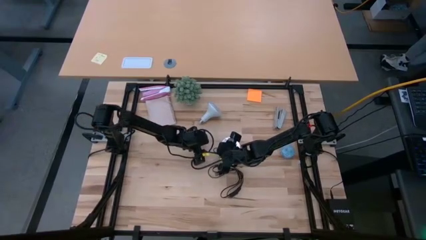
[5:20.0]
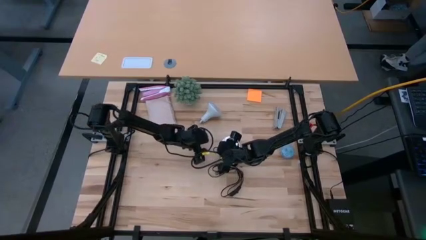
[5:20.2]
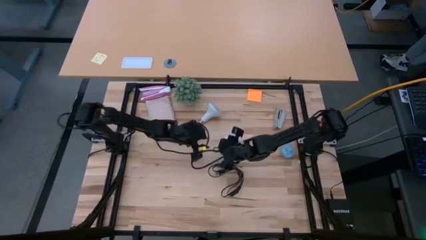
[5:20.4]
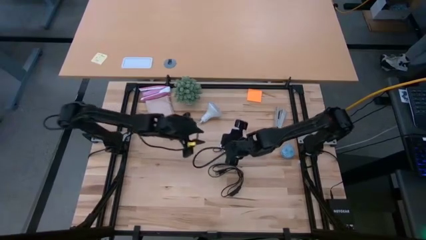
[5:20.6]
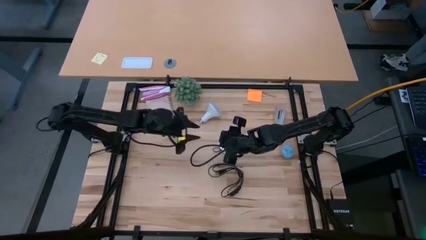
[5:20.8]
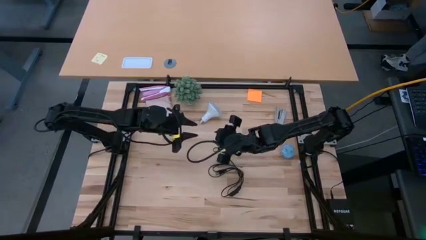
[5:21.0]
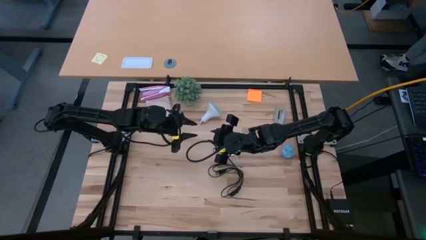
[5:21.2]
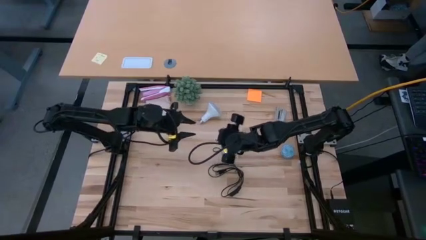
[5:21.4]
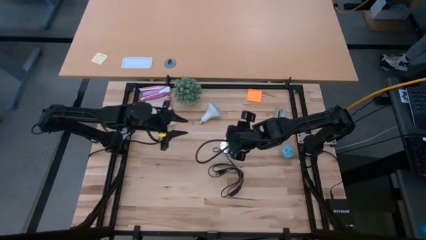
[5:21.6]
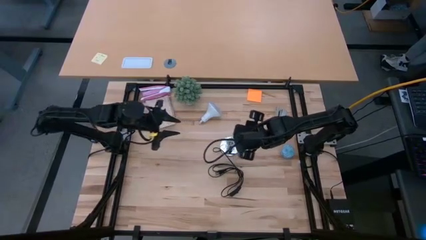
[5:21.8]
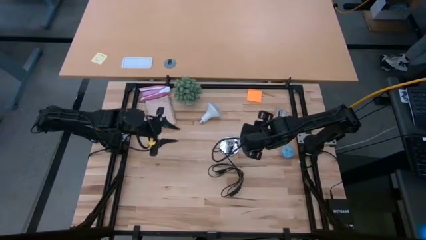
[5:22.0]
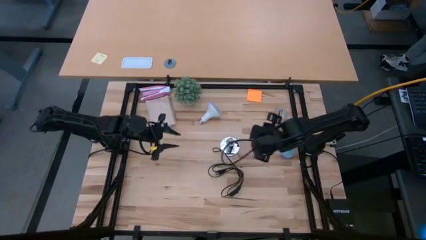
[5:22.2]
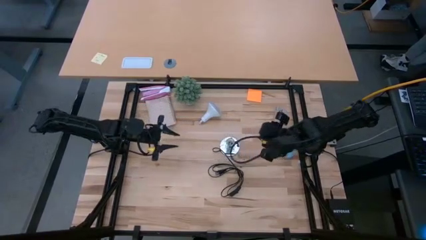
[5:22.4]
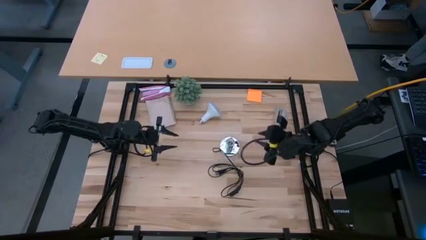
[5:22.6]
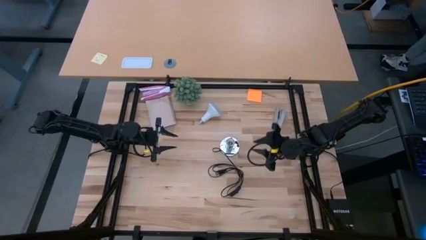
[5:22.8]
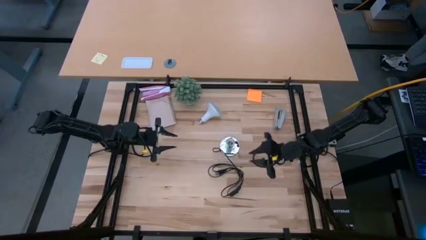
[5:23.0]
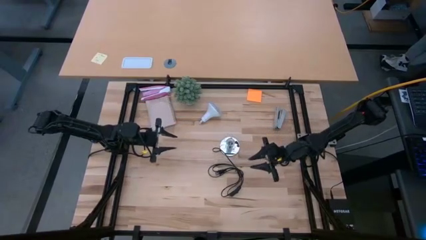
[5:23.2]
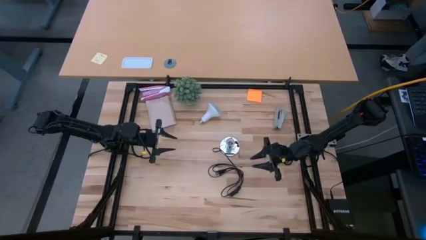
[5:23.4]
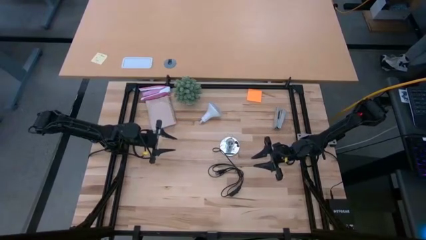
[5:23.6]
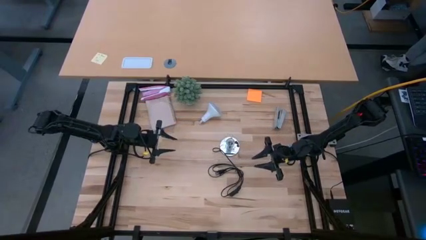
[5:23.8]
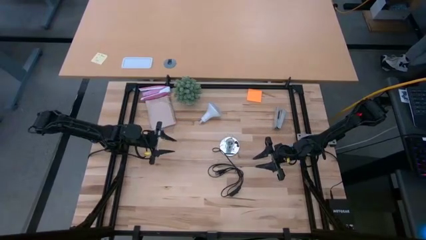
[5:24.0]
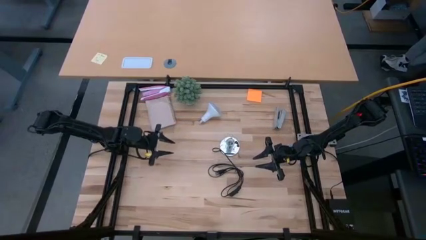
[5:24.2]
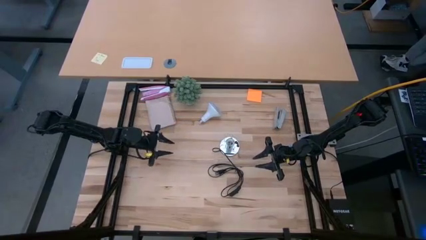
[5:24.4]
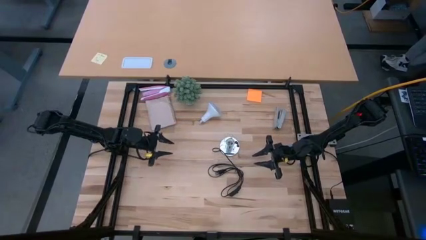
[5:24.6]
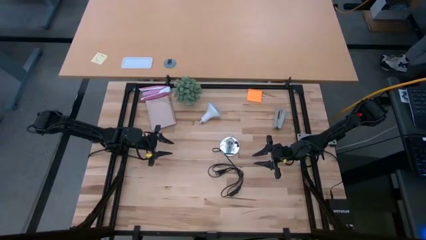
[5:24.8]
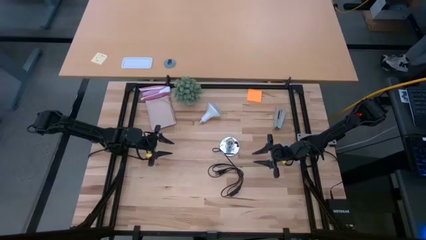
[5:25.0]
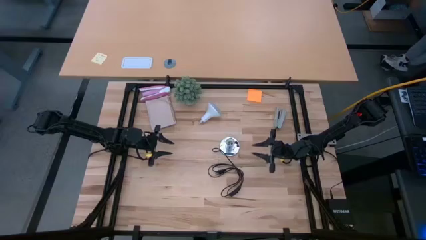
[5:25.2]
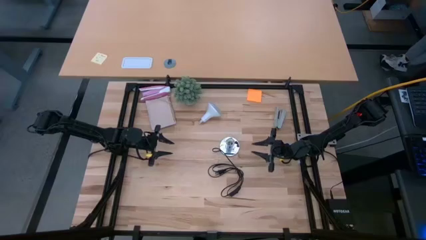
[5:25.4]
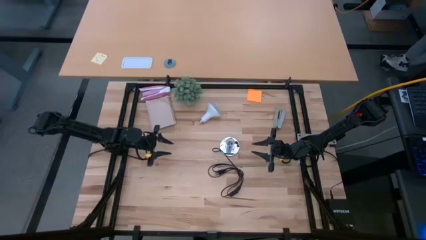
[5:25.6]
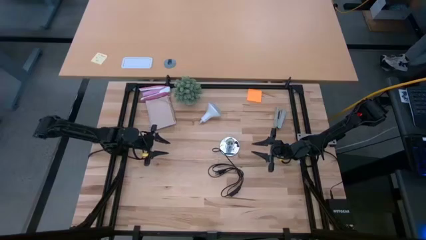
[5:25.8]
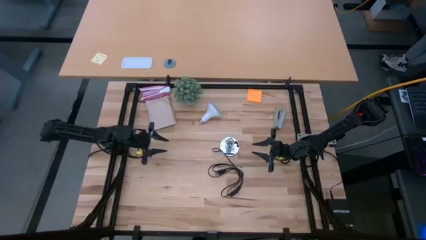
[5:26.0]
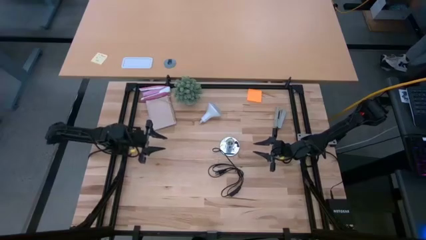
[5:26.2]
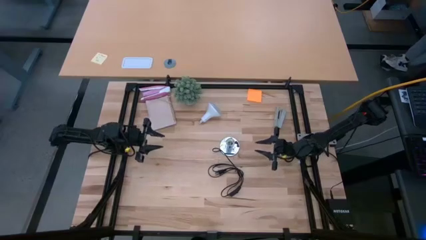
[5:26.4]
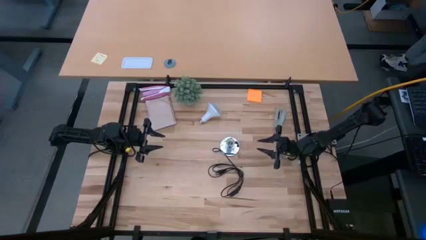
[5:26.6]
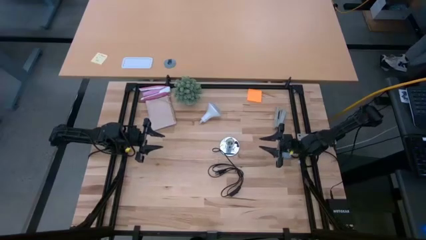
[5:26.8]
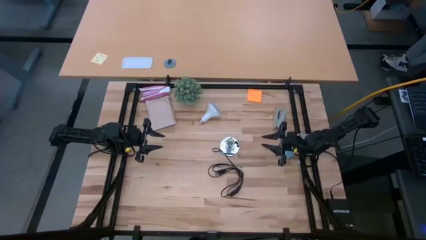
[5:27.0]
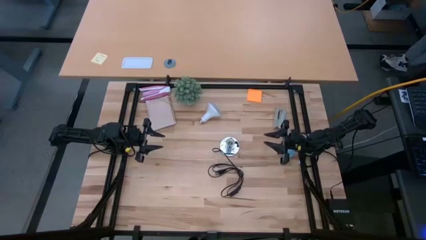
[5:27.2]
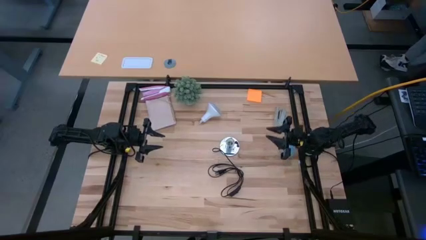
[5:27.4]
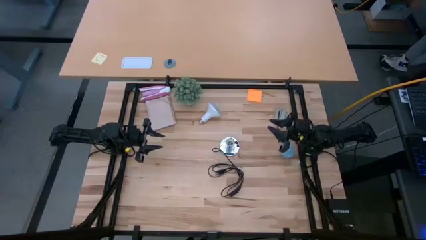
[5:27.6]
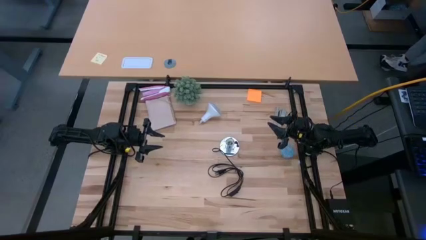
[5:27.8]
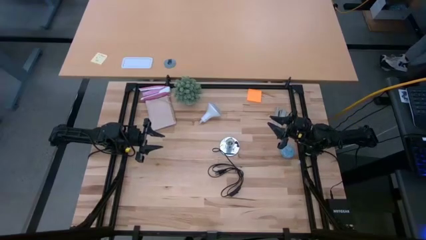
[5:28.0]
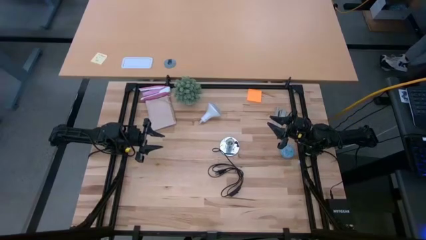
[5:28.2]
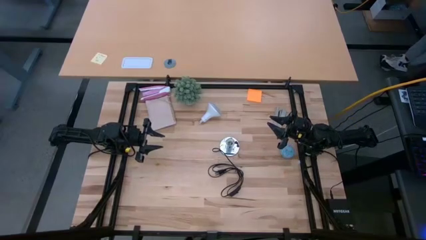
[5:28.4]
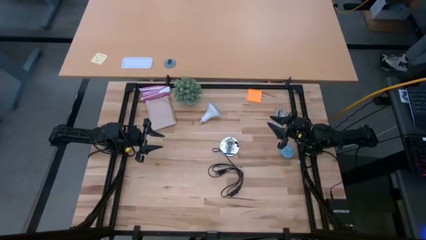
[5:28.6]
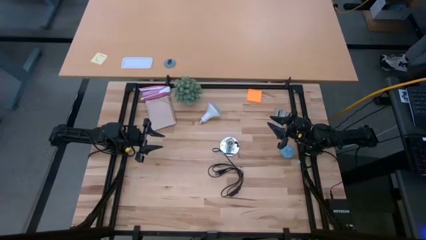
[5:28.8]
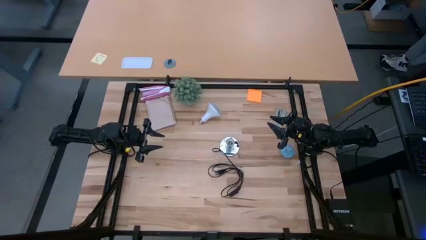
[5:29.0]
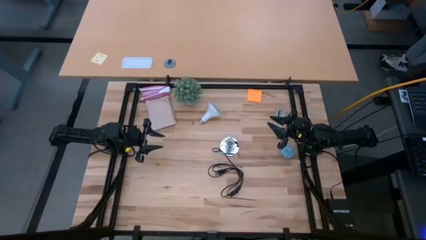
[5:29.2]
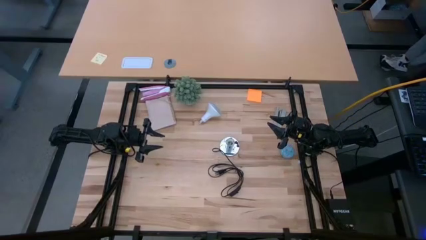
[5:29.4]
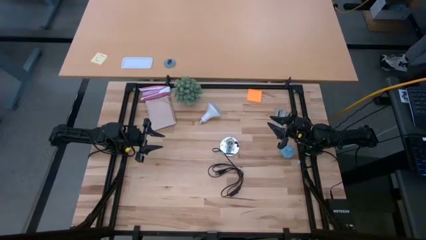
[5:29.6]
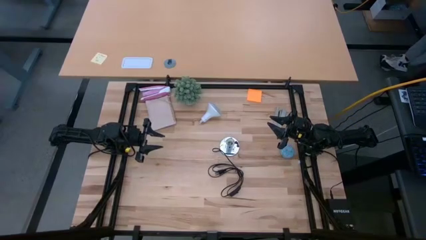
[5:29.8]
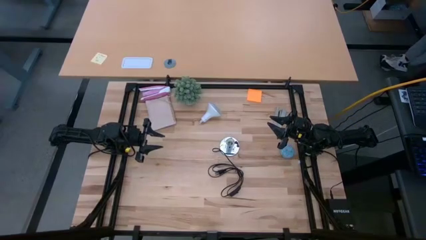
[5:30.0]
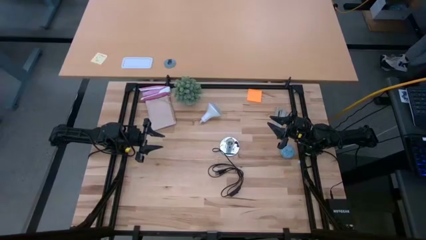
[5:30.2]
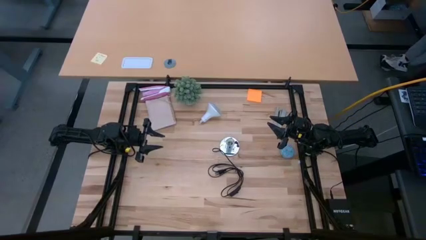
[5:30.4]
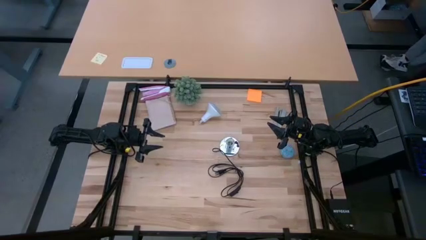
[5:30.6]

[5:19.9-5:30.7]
Task: Screw lightbulb
Return to Home Position

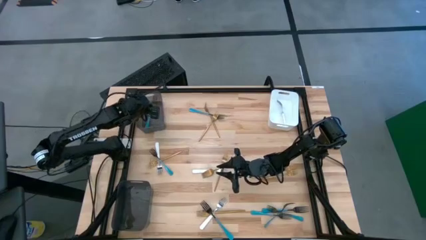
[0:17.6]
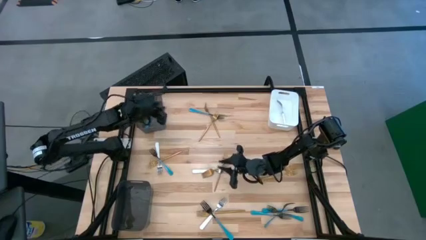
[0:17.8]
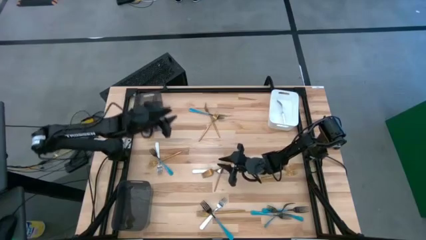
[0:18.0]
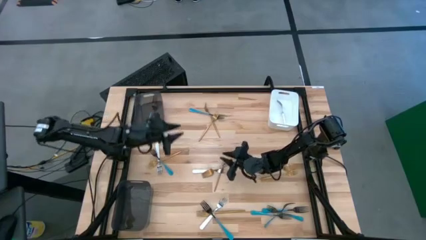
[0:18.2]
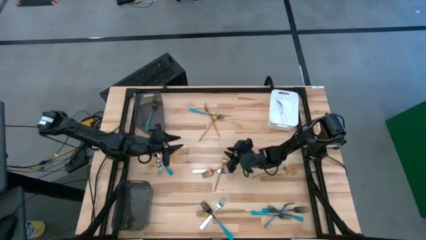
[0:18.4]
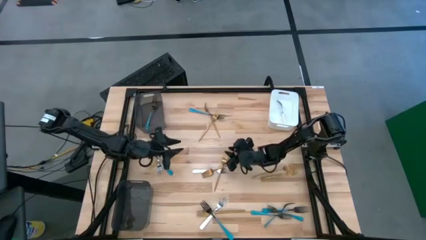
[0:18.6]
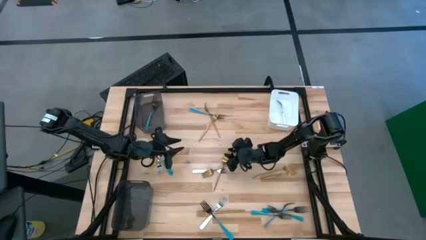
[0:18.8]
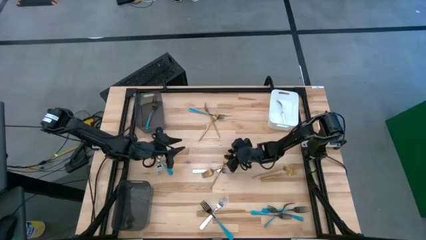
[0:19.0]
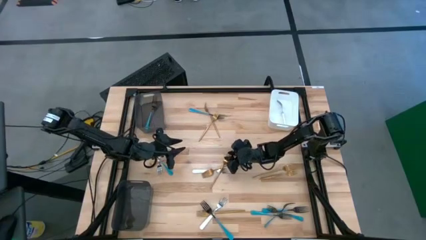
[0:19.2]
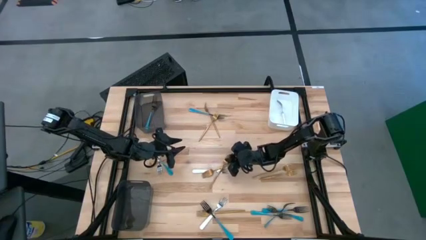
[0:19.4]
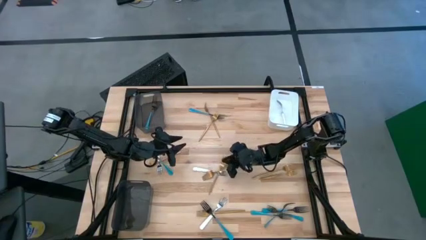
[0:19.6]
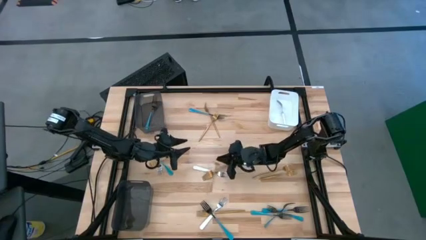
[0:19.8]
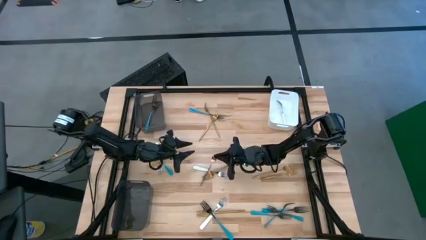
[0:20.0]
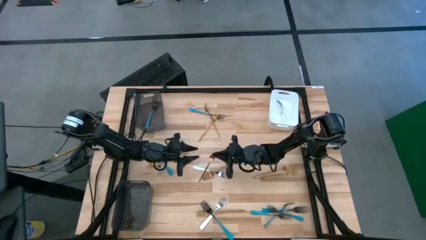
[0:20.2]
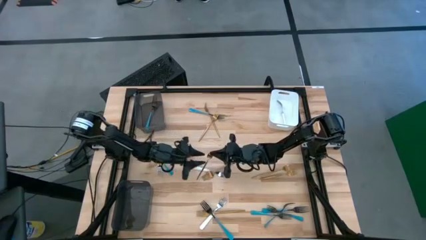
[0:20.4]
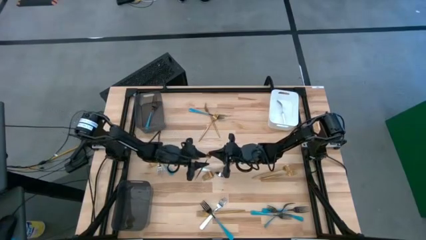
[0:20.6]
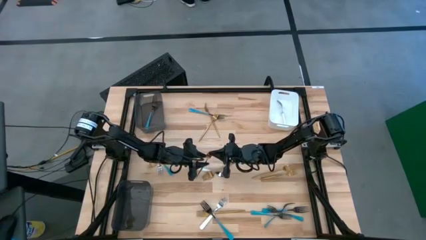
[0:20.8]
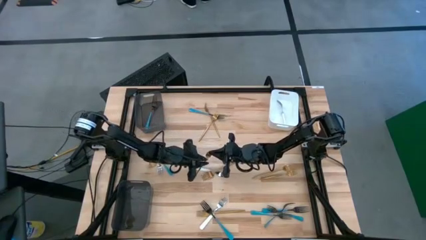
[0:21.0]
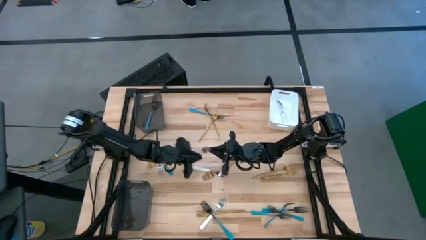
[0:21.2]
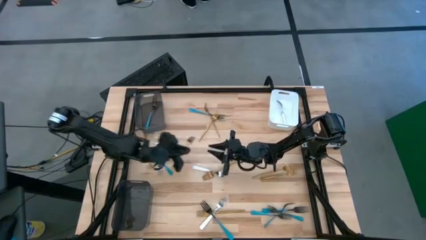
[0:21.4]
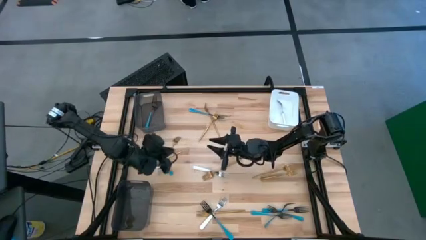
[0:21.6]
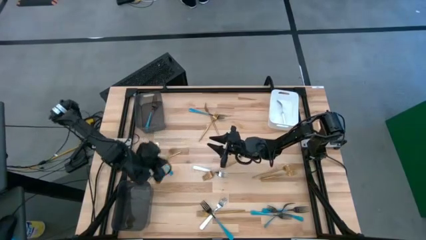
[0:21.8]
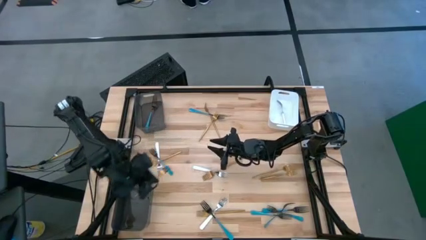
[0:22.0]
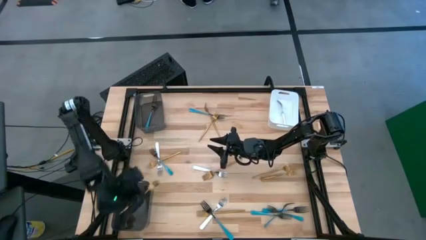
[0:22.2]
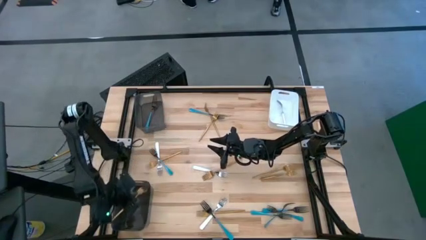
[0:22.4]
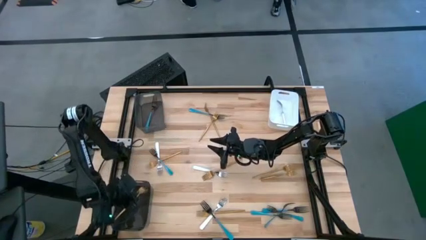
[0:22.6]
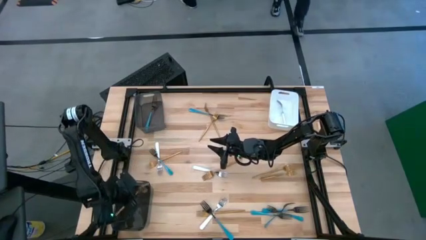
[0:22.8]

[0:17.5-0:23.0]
Task: Sort silverware by color (type)
Put the gold fork into the bottom black bin
